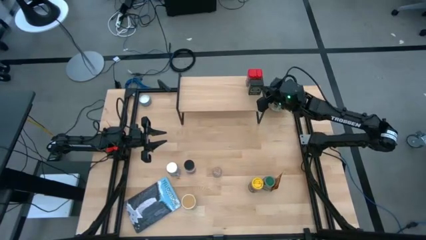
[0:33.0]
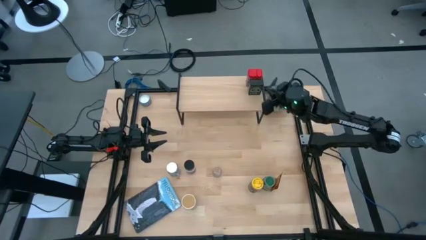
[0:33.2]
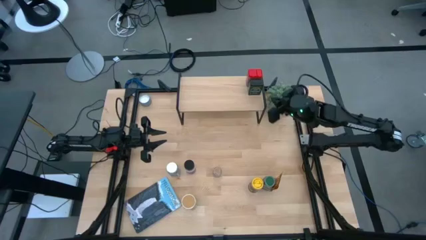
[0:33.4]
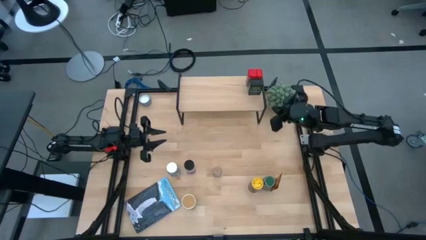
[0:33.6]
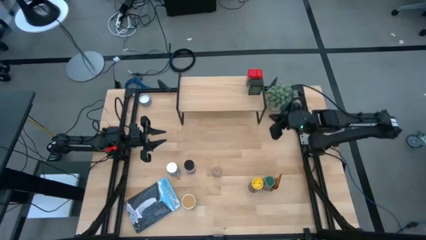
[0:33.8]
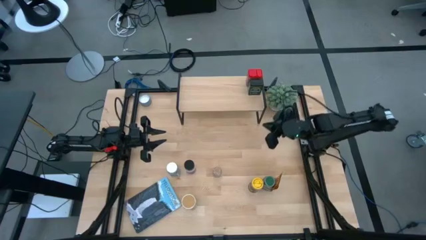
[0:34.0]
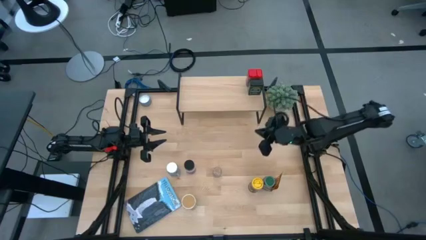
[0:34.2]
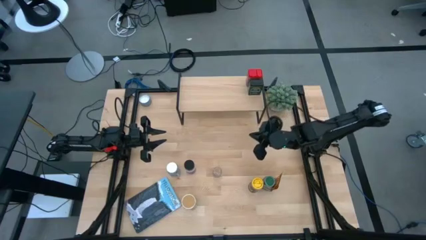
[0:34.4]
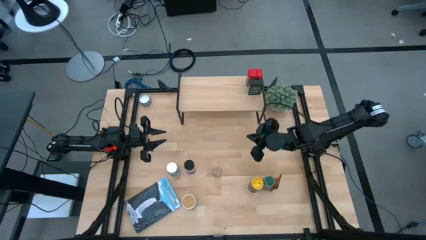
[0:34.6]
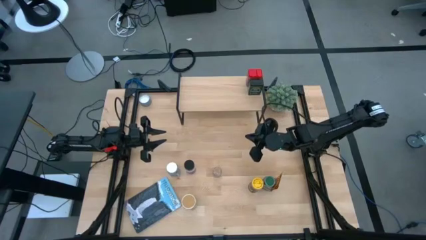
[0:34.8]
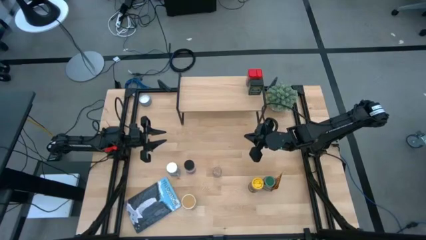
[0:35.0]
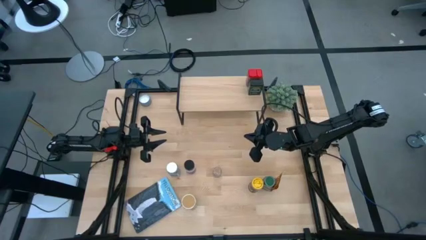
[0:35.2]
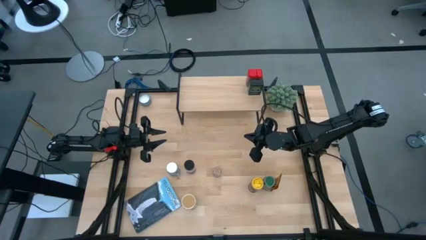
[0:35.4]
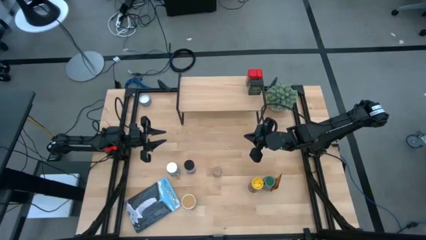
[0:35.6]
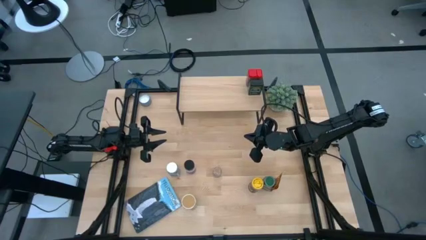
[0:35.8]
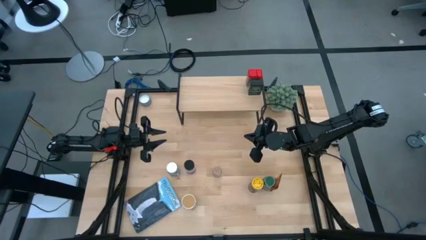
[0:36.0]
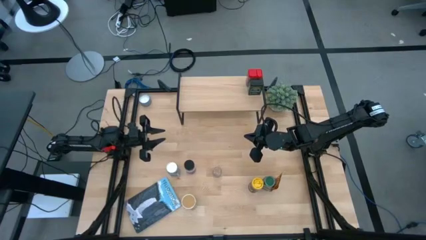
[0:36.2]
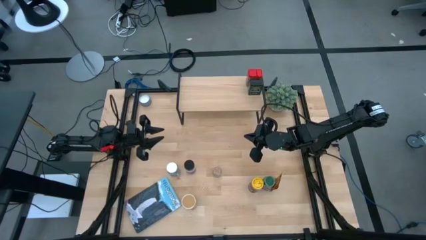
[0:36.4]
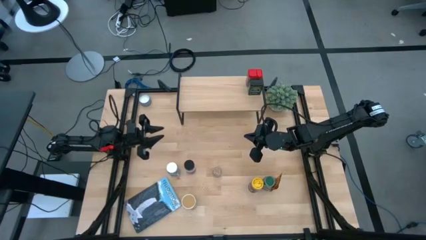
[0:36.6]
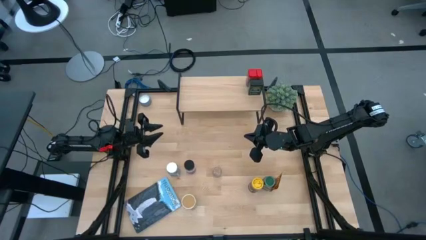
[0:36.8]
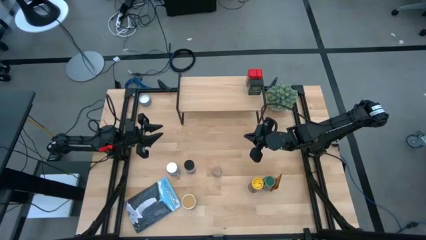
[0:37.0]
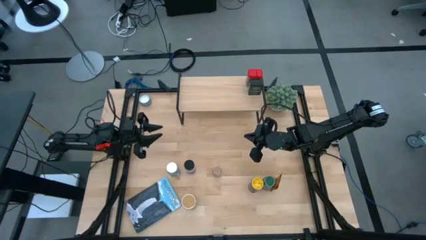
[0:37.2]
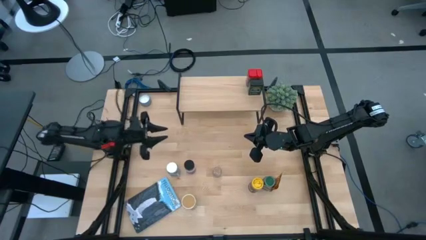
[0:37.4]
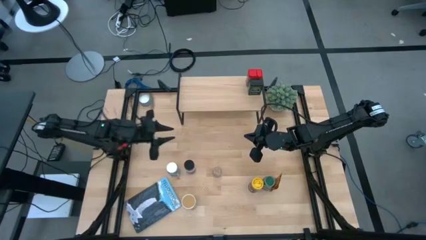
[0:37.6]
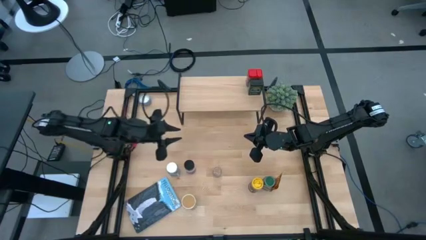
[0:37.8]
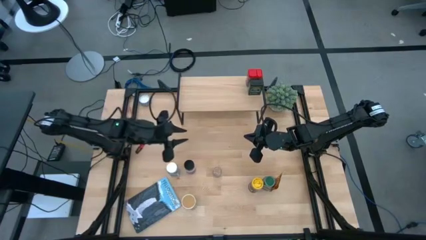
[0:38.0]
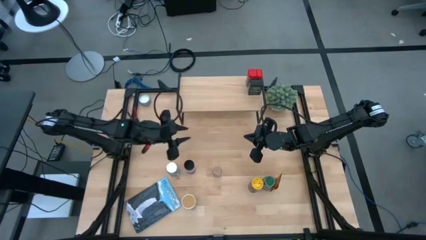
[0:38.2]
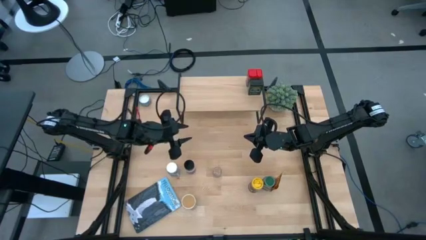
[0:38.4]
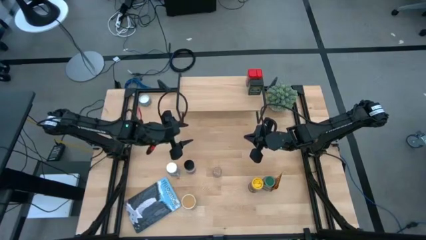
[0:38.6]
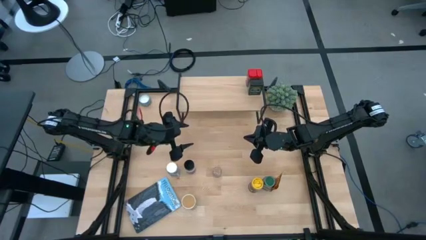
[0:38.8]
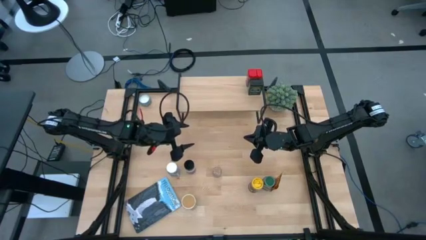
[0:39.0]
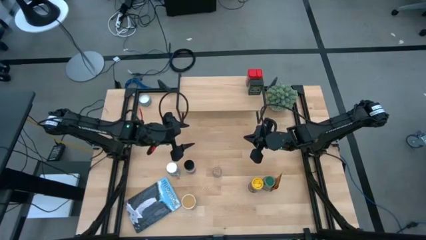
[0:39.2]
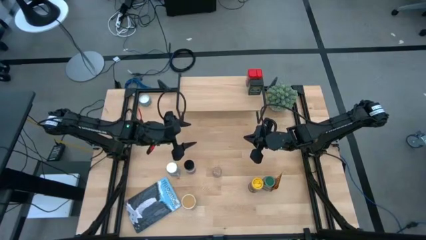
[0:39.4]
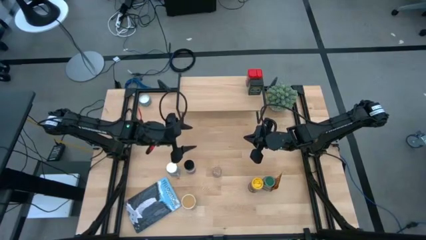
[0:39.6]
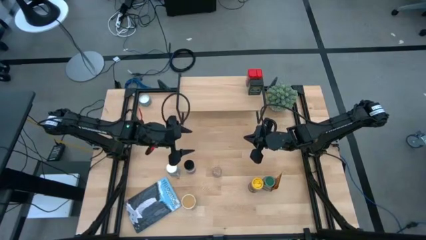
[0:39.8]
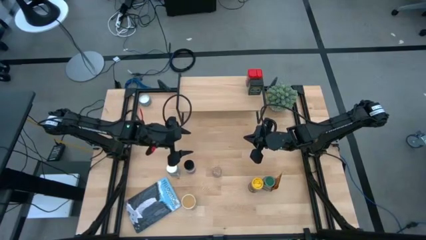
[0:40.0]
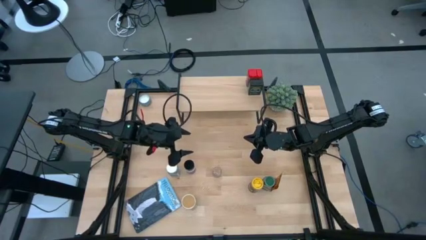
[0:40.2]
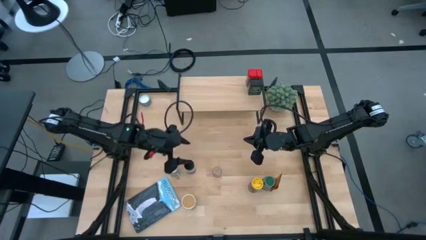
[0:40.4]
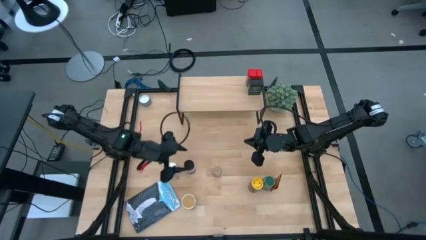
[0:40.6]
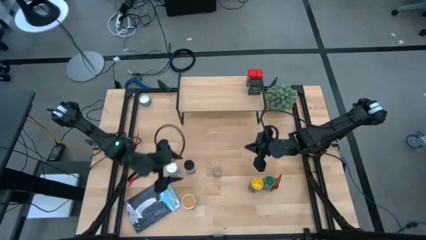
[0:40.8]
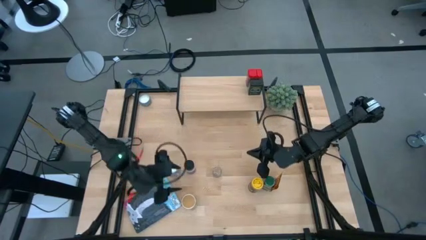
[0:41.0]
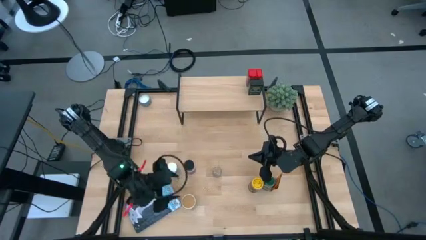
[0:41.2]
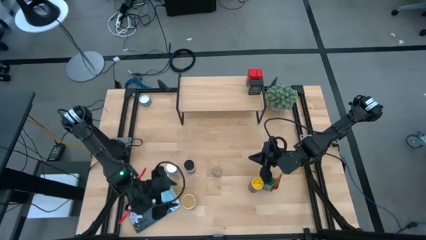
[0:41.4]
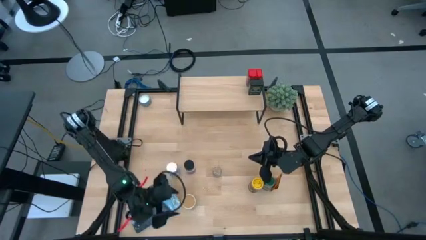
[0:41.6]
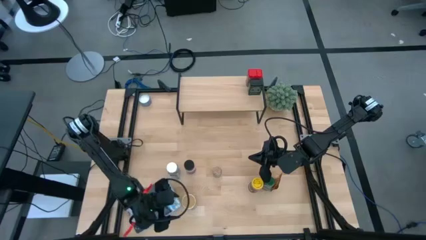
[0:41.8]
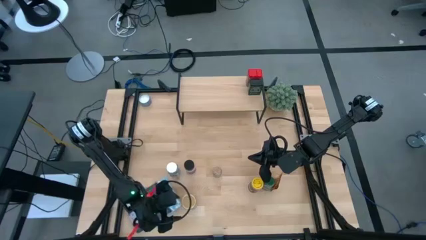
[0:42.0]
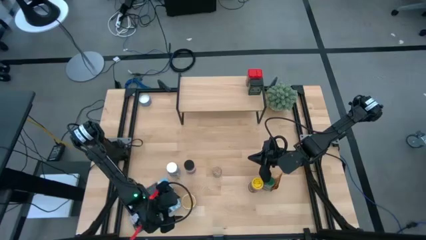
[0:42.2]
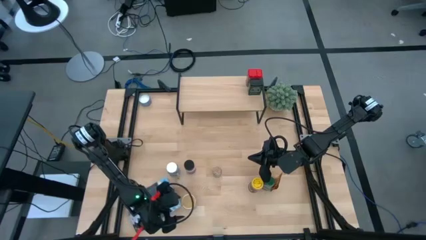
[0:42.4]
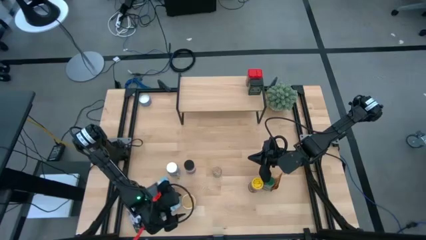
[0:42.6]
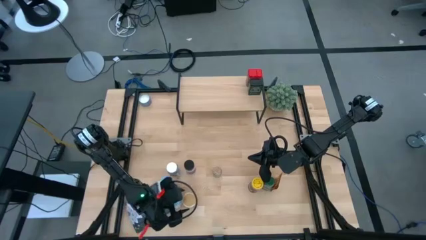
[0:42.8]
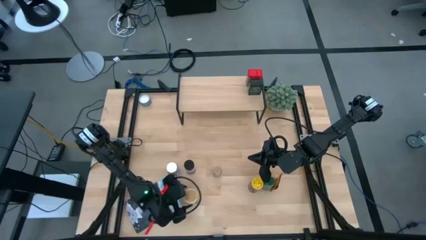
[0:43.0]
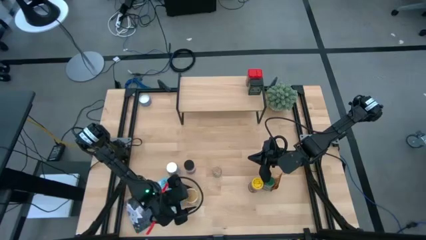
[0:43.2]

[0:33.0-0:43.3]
Task: Shelf spices
Put the gold seasoning bottle on the shelf

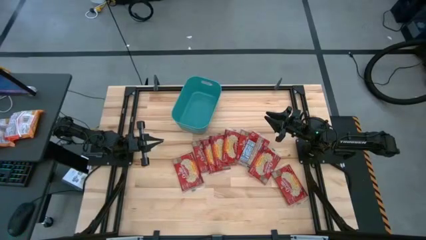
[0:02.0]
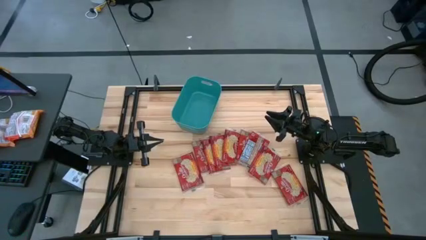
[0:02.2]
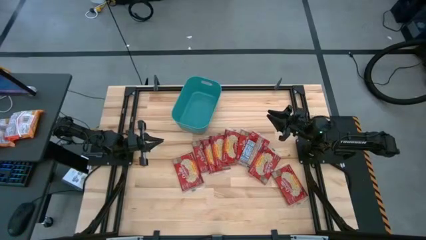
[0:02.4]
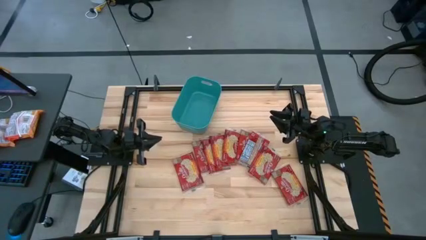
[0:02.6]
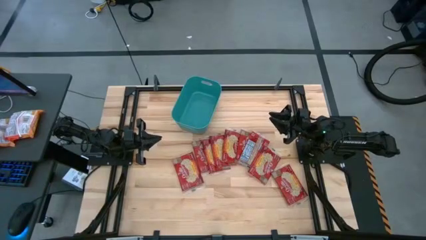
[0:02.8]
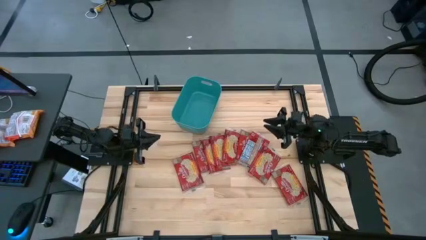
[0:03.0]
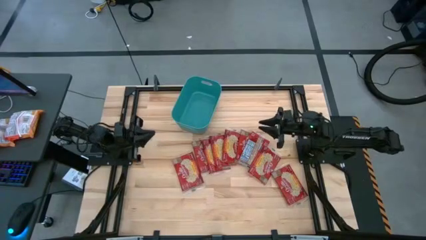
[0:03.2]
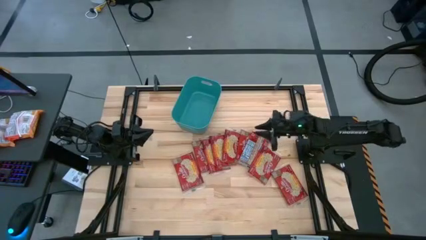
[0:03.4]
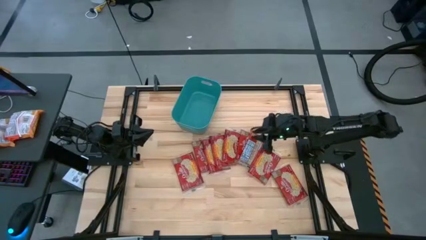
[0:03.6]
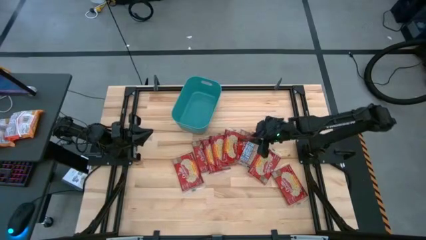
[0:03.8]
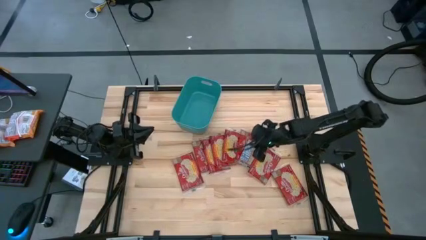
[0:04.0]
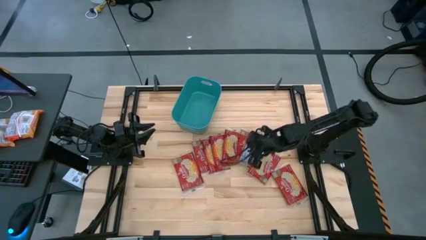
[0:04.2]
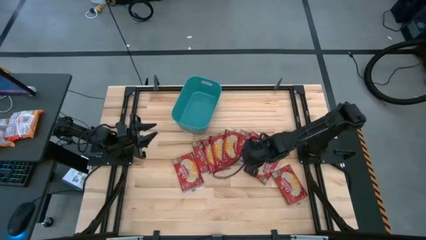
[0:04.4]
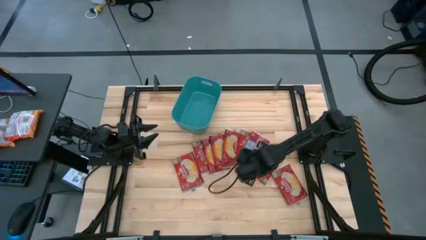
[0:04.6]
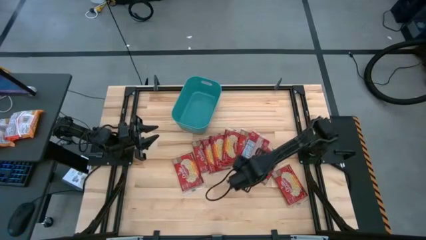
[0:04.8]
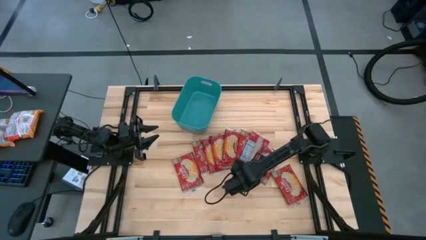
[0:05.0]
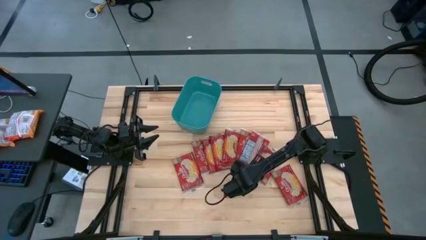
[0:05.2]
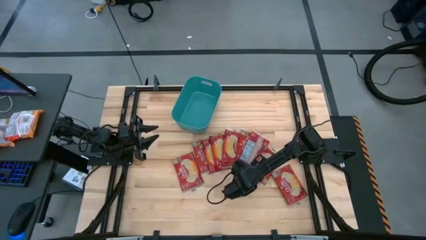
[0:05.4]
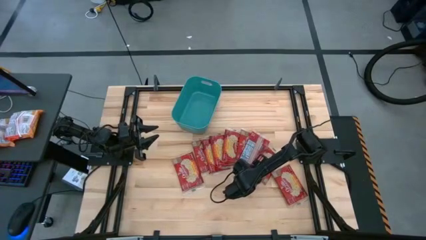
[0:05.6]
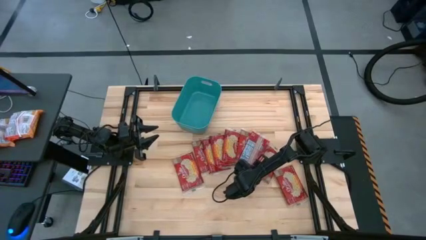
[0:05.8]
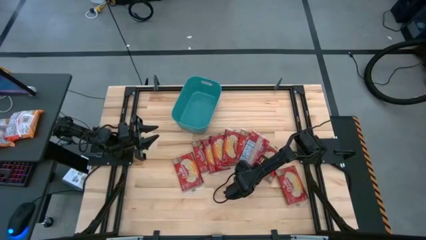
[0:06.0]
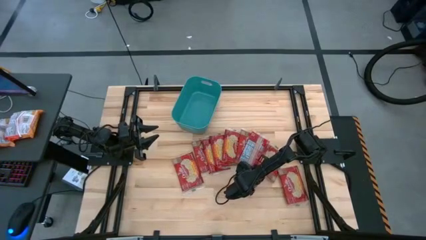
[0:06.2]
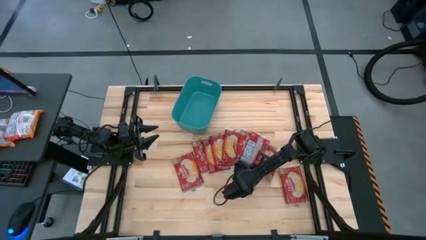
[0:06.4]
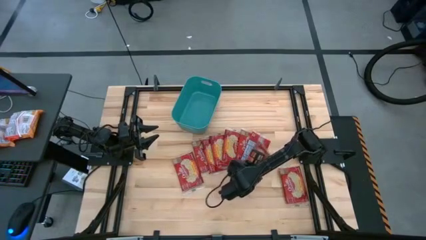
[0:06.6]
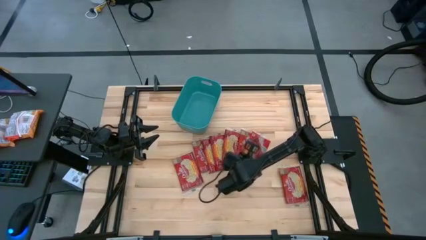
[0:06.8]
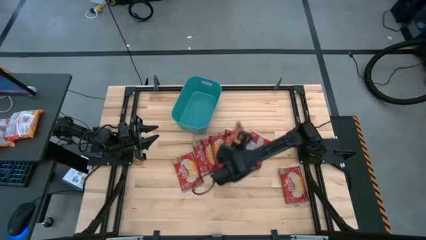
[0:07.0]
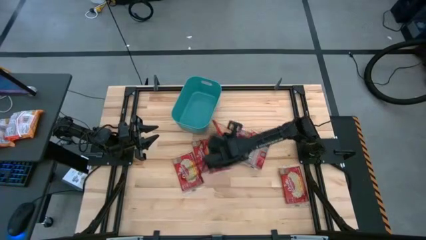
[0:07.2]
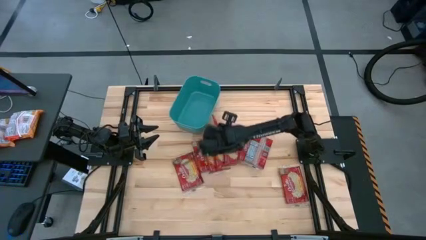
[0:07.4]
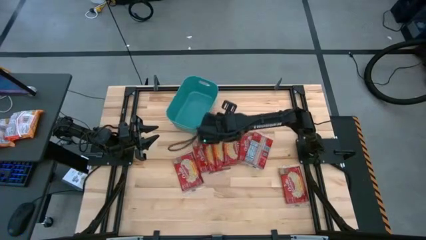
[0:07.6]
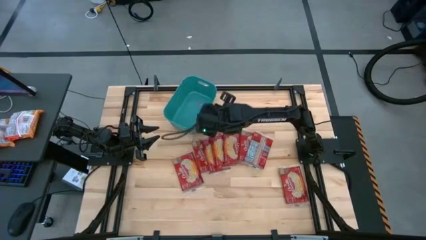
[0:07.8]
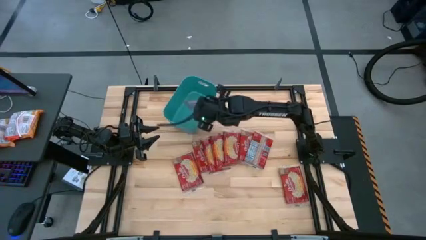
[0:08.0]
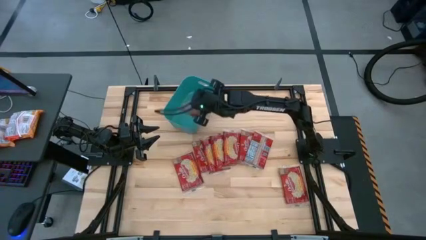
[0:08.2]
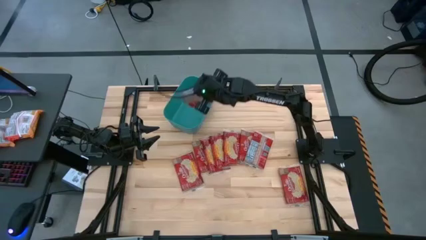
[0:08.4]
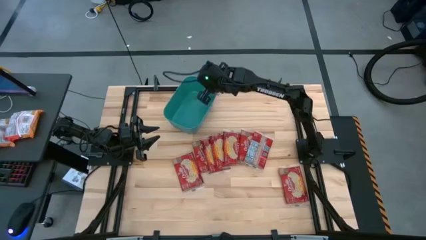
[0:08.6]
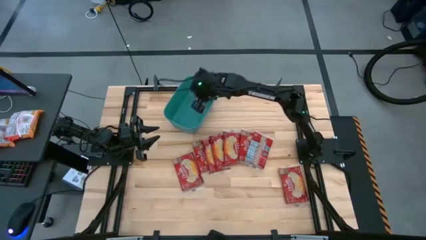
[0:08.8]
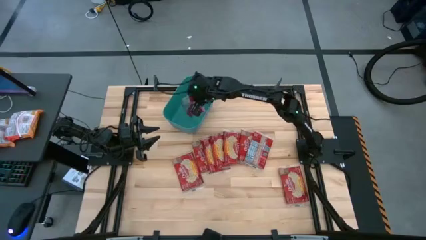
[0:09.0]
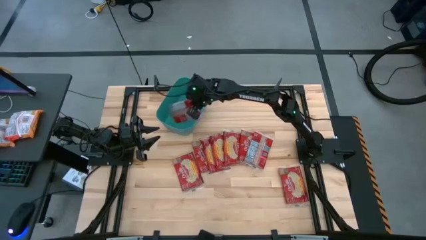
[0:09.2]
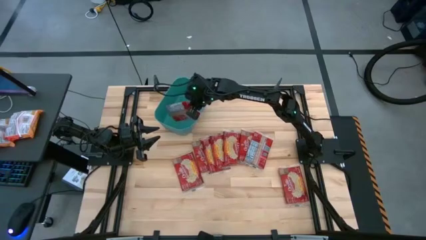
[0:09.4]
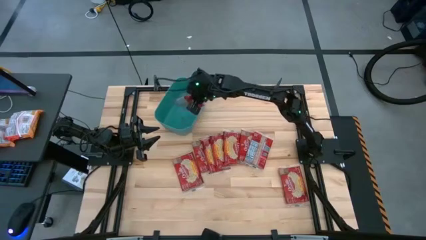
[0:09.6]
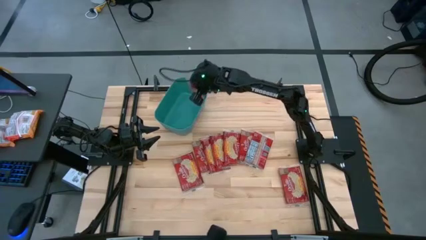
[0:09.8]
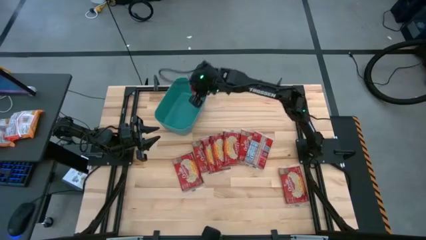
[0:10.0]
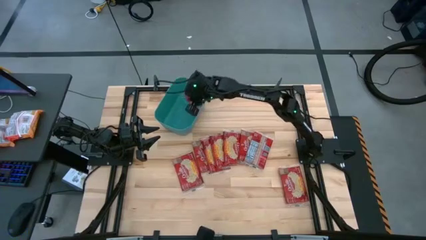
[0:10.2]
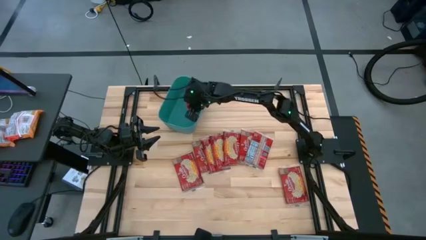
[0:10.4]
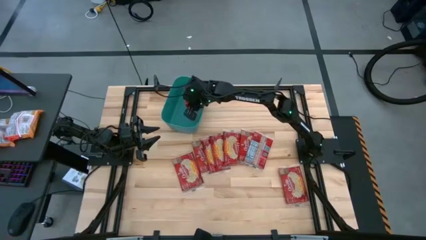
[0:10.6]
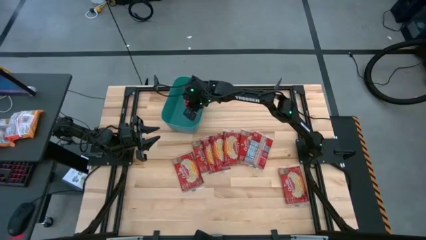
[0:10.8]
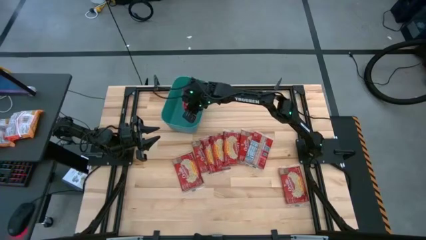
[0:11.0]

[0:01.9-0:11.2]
Task: Sort popcorn bags into baskets
Put the red popcorn bag into the green bin
